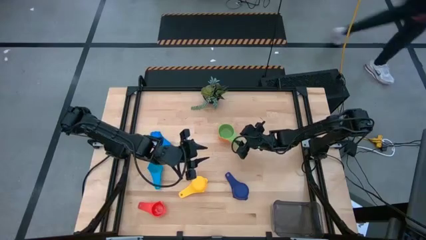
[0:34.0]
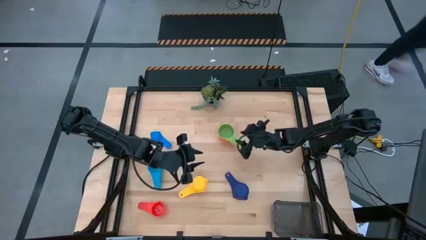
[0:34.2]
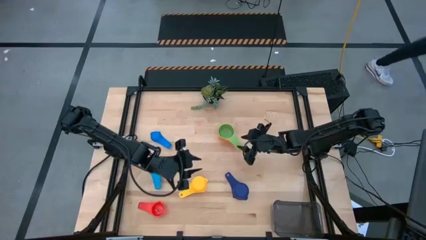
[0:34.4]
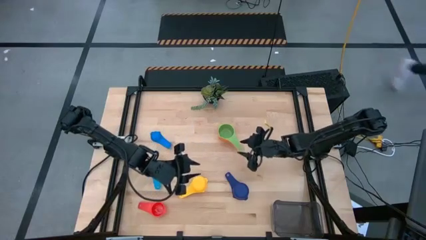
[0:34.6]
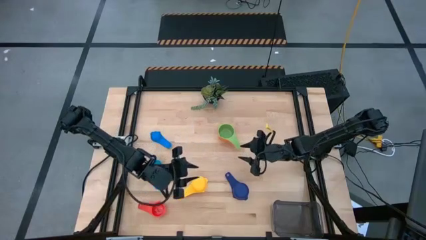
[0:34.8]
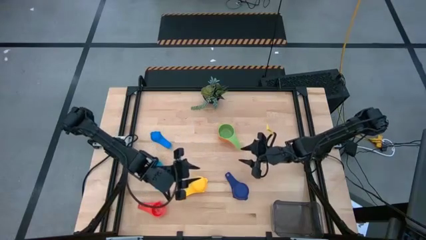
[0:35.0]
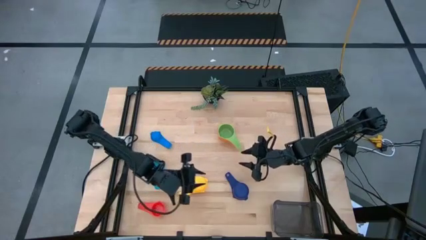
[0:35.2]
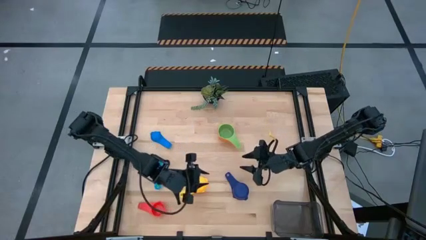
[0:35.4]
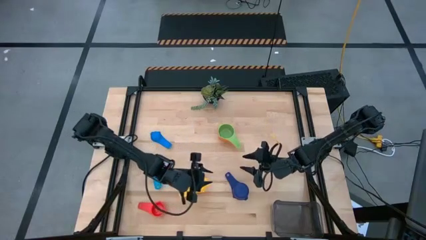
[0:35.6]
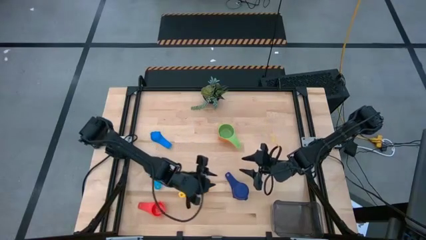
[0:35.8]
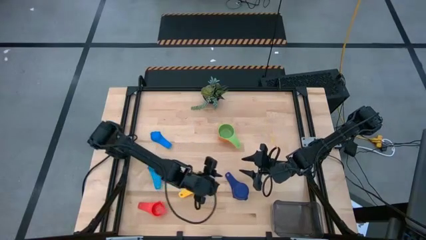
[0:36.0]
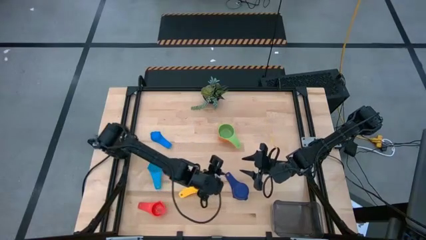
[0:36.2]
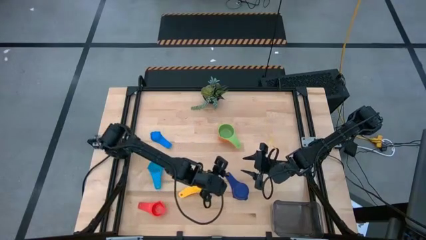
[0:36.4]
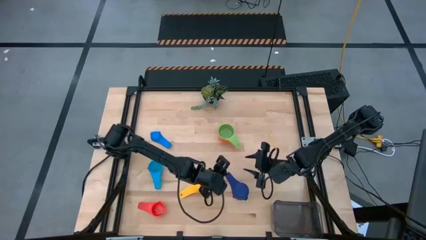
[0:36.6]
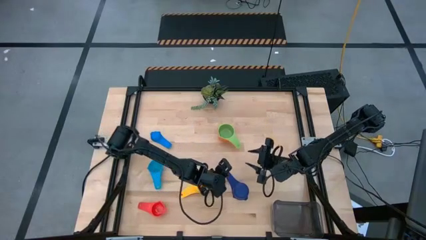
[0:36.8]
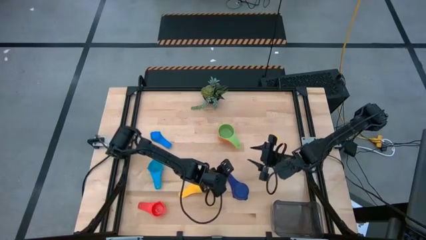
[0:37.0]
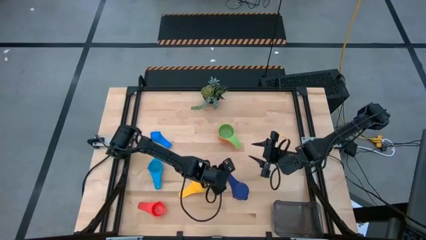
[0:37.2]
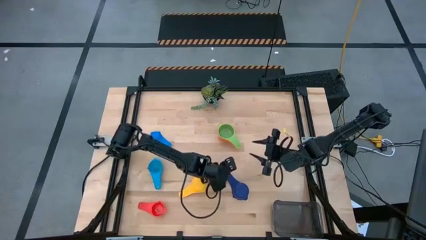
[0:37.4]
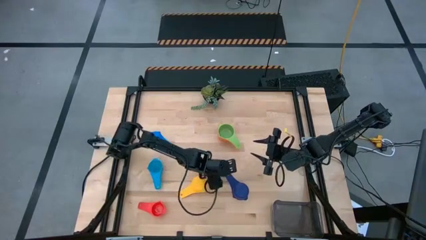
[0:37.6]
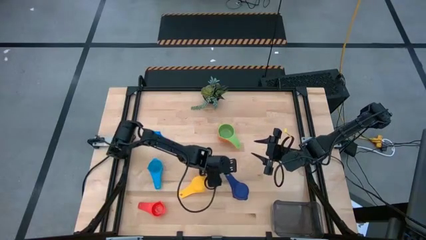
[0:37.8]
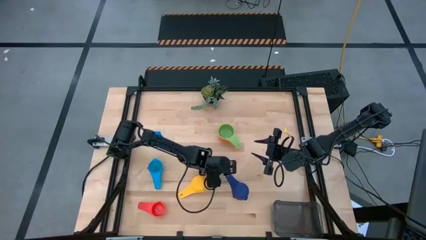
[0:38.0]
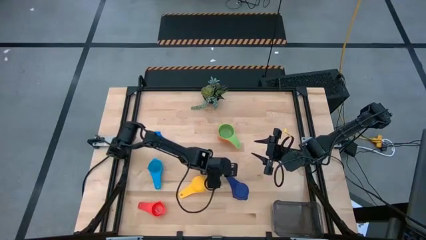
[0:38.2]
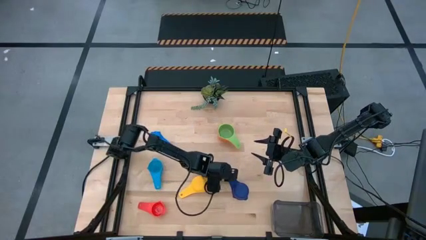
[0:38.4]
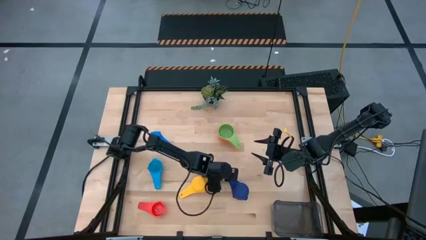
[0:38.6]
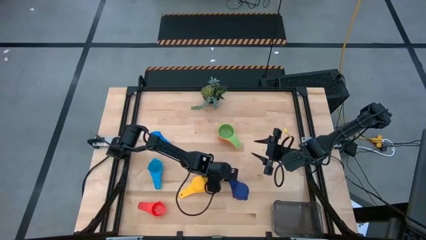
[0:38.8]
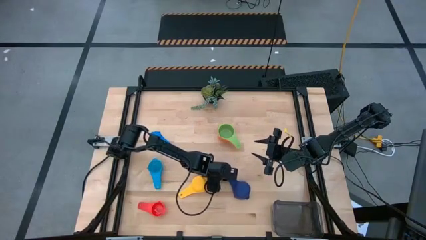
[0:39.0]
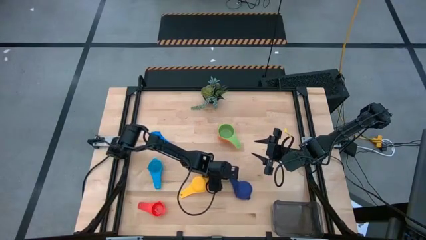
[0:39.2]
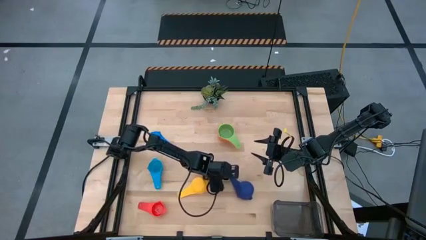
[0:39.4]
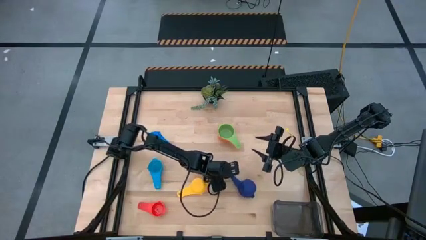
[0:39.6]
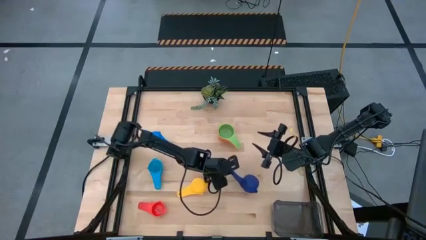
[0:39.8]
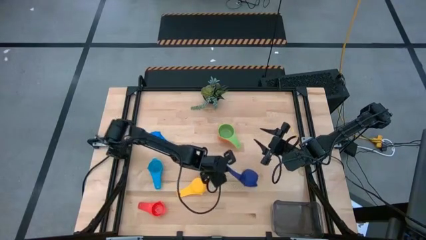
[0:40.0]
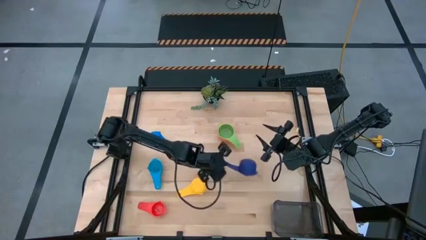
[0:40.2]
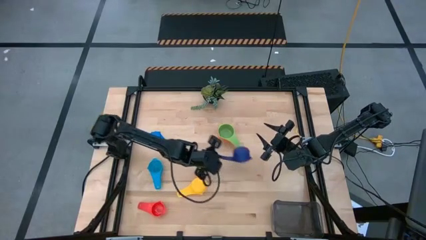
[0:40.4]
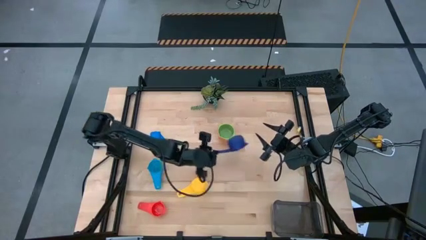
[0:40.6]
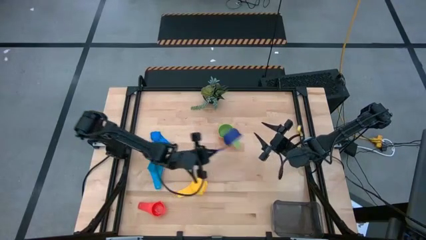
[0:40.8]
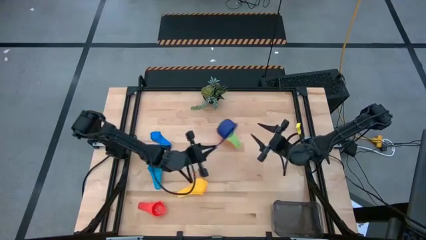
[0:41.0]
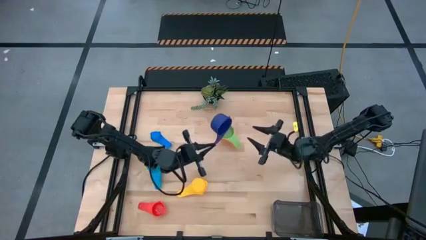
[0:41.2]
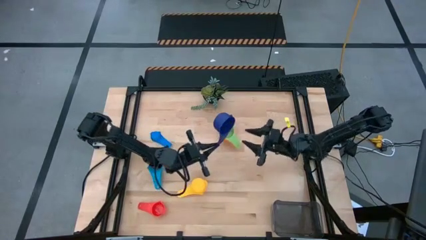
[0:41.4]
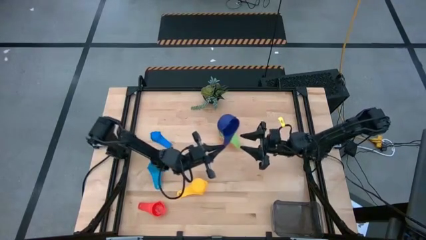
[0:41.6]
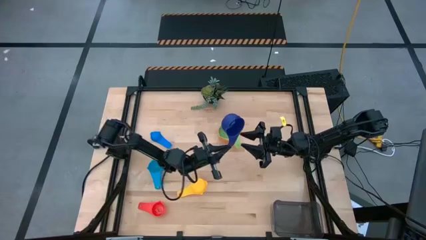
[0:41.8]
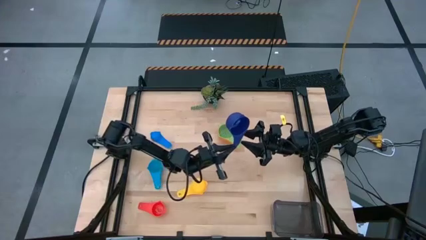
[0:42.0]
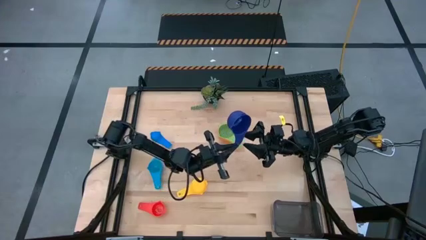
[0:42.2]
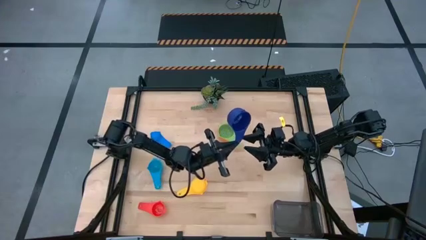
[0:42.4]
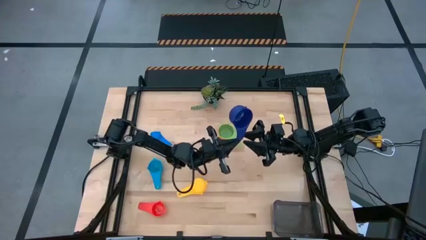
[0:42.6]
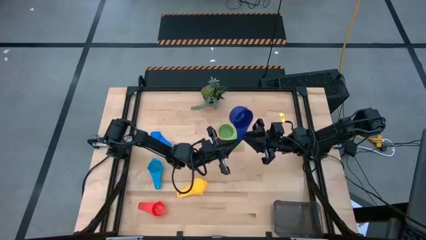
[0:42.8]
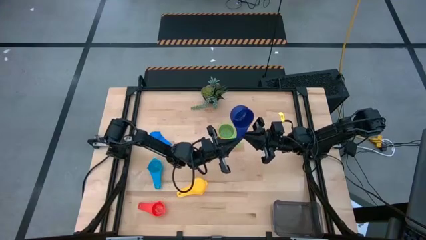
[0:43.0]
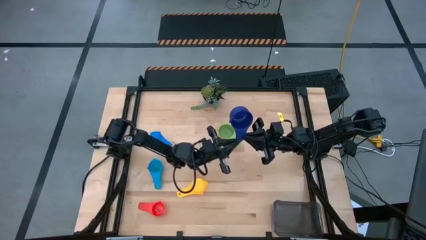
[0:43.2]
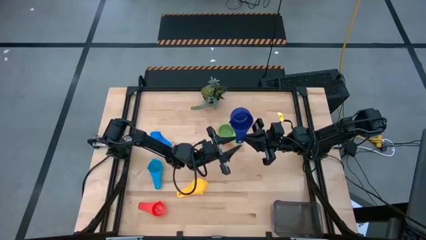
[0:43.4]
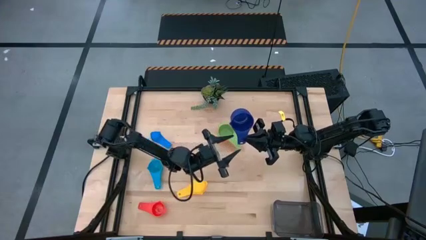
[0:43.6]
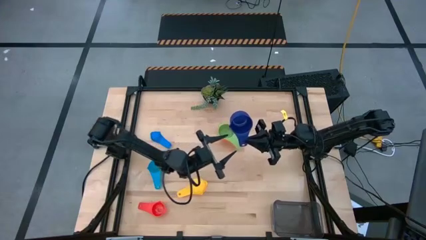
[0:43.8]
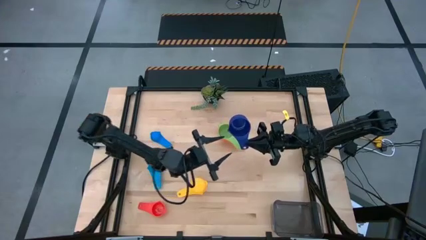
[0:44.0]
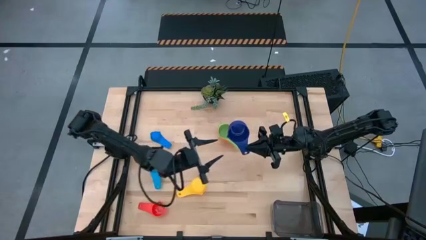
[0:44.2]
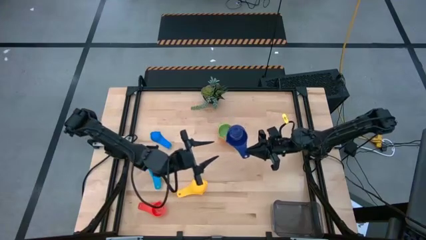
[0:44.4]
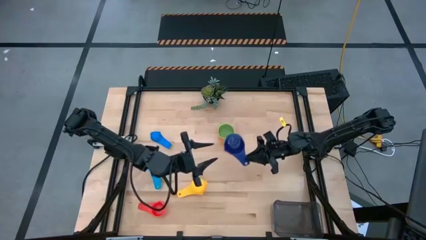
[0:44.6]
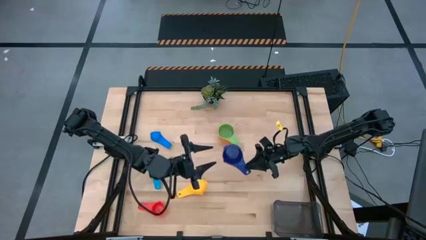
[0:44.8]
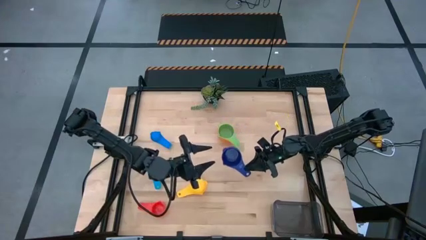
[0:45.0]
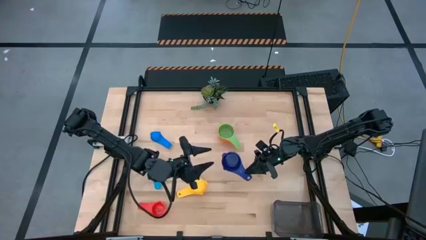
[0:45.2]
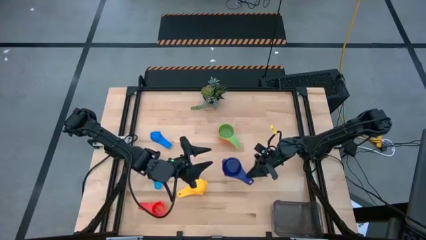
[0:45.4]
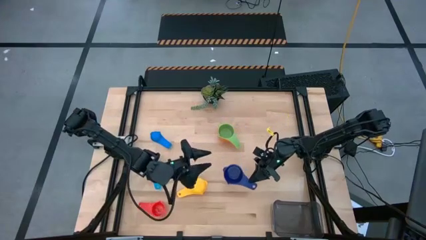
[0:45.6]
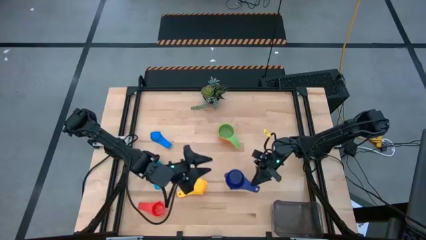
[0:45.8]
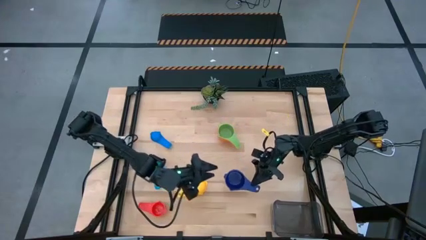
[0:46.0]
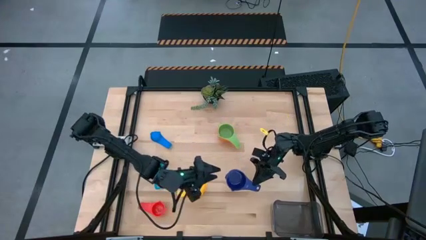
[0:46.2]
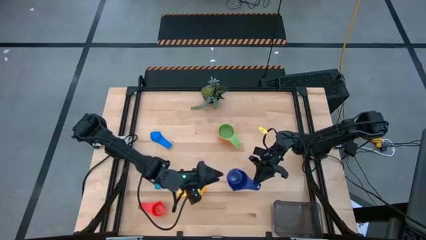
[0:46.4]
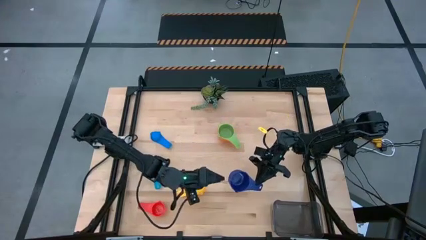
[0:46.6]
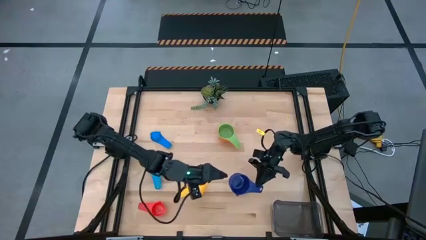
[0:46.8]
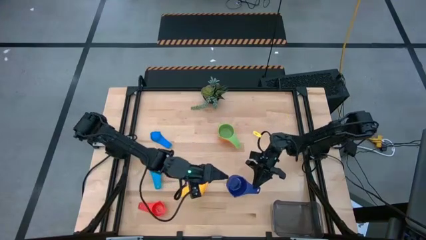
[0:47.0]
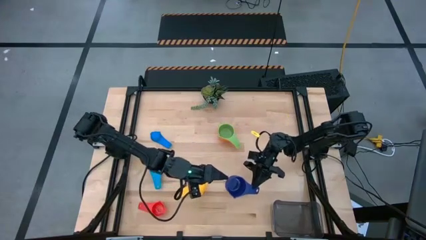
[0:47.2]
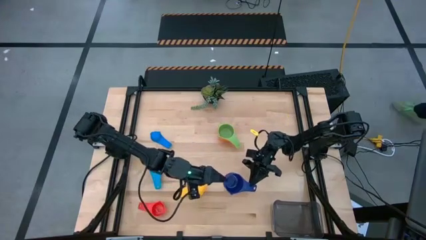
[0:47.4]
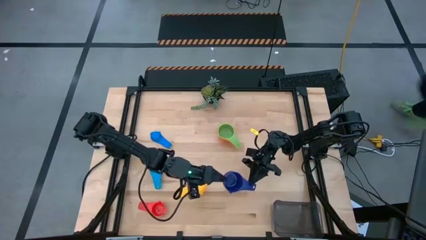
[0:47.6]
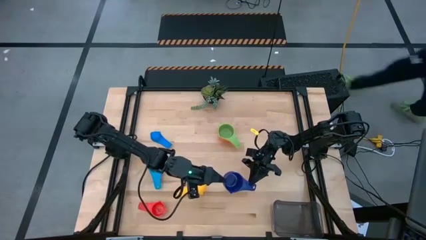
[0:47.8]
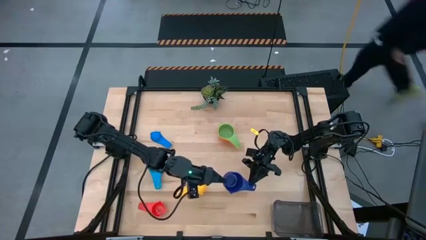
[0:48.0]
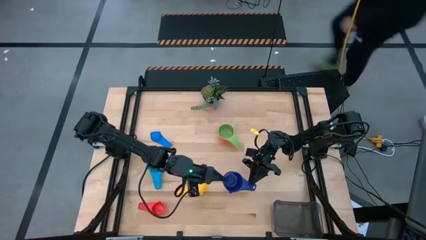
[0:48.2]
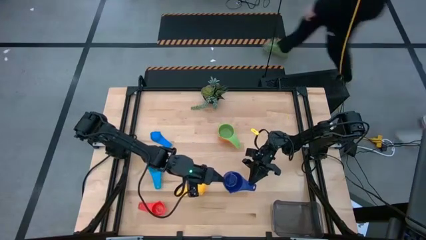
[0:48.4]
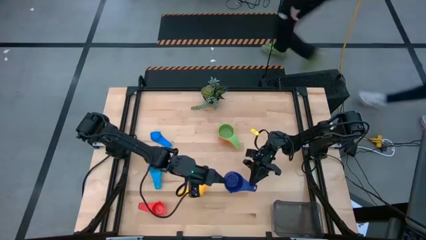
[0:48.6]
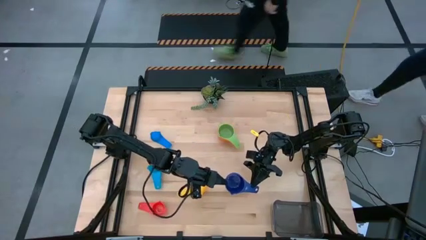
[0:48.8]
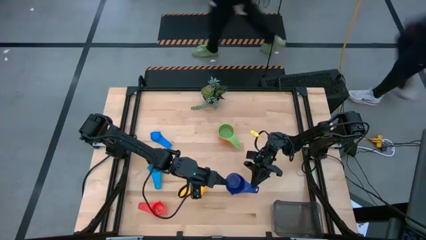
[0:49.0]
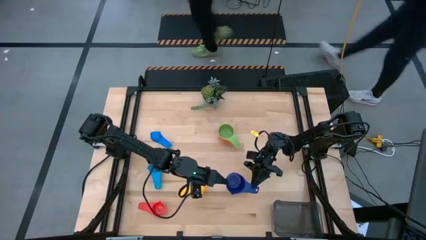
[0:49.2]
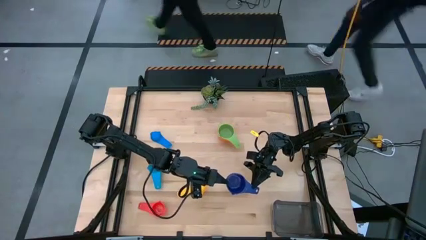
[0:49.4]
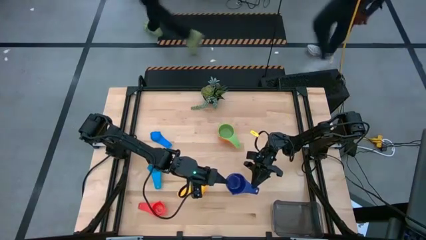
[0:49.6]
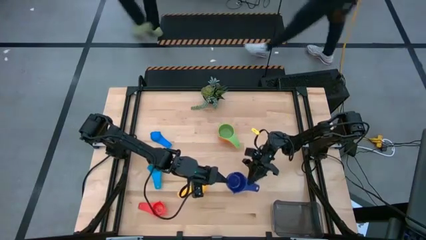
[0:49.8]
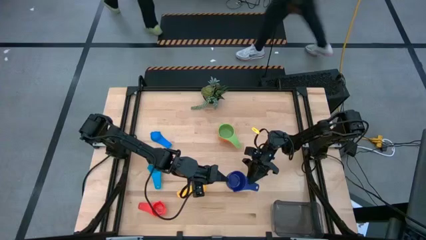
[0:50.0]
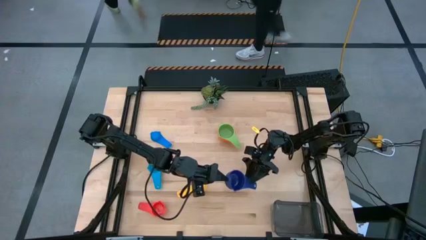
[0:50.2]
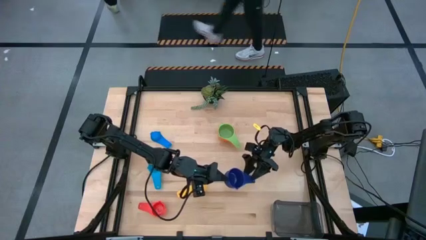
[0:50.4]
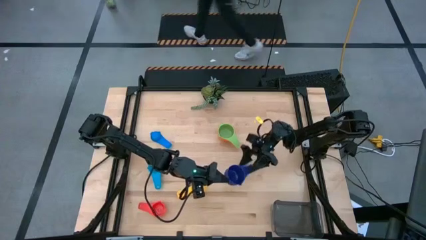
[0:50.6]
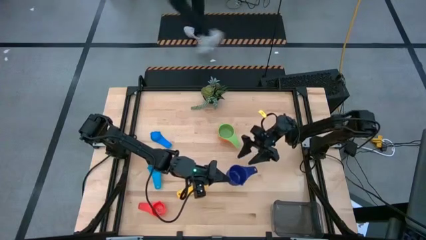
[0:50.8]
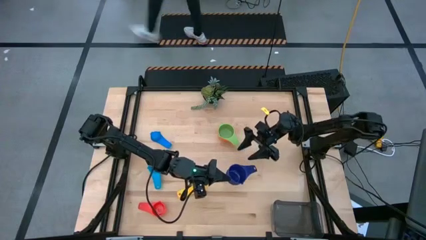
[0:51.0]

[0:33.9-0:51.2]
Task: Nest measuring cups in basket
Stack the violet measuring cup on top of the green measuring cup
